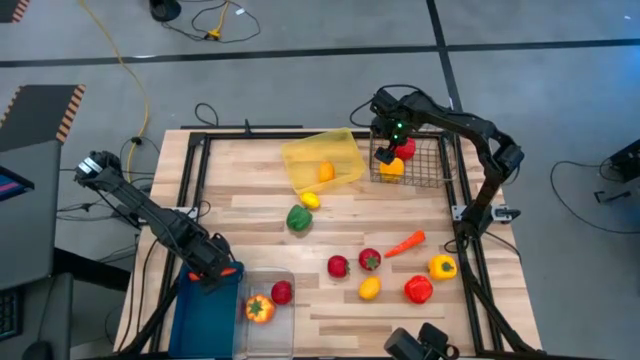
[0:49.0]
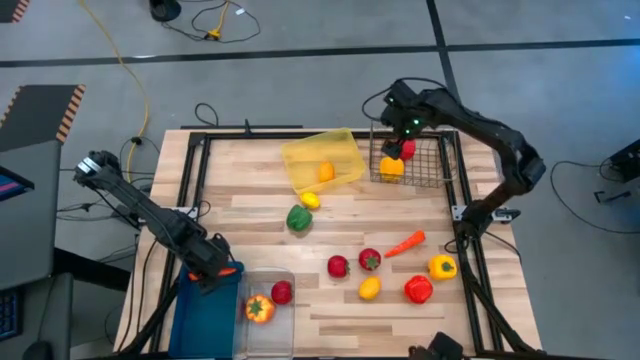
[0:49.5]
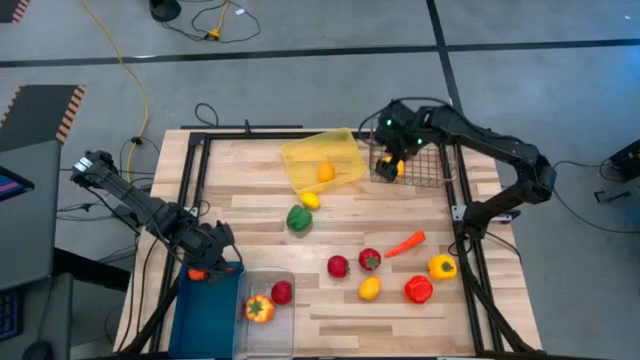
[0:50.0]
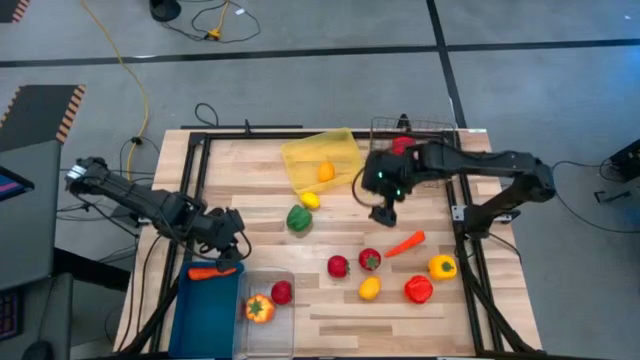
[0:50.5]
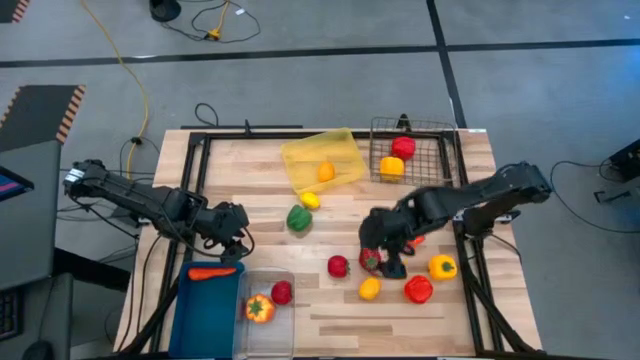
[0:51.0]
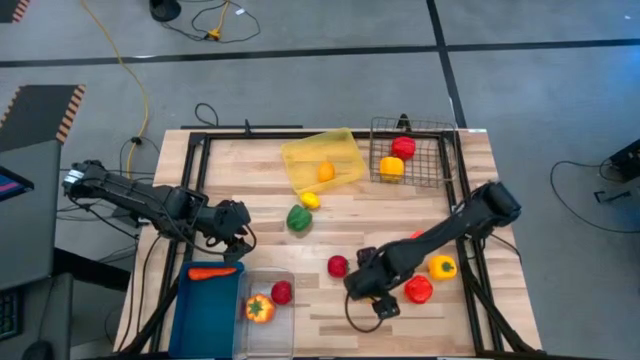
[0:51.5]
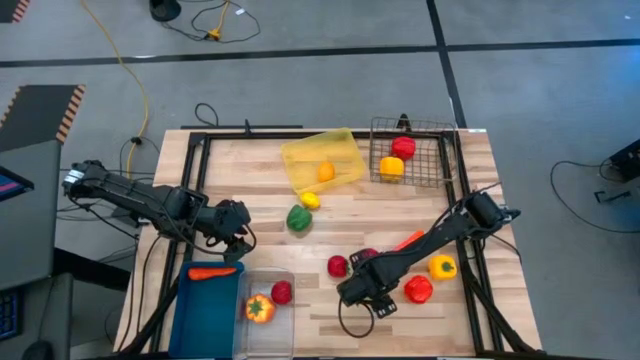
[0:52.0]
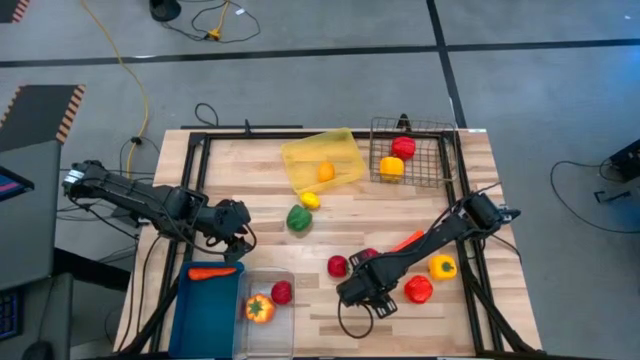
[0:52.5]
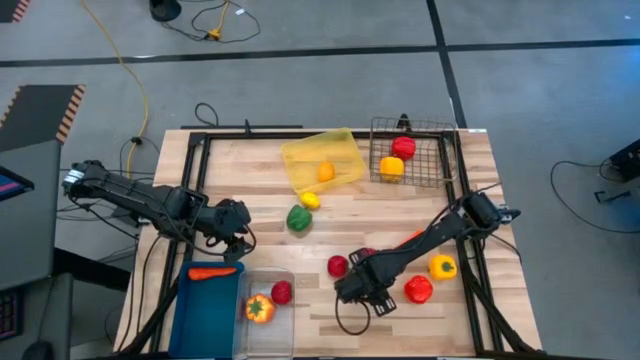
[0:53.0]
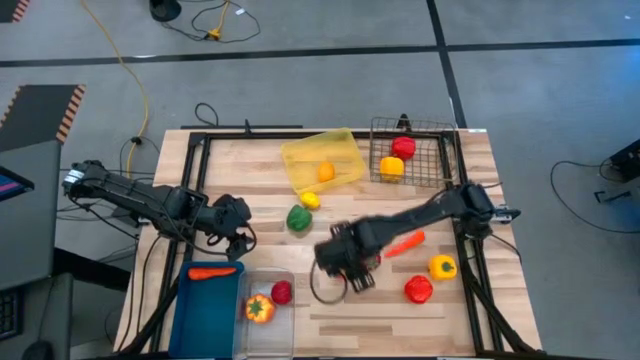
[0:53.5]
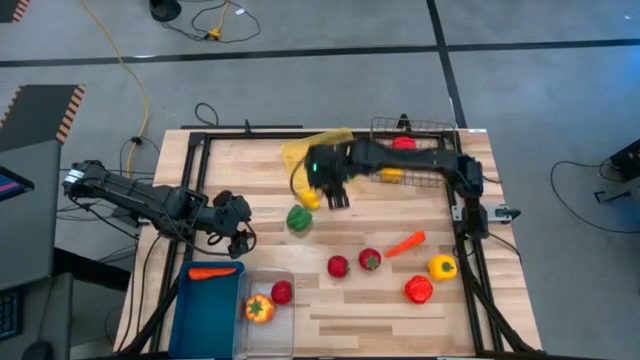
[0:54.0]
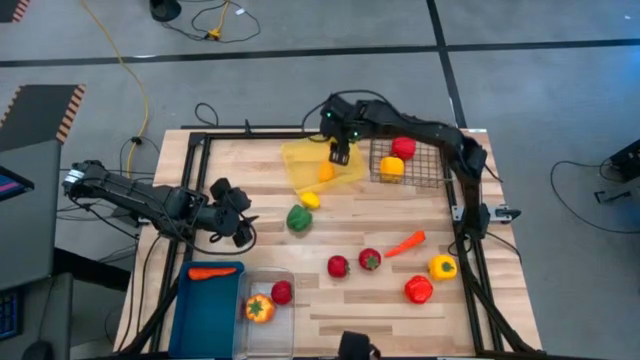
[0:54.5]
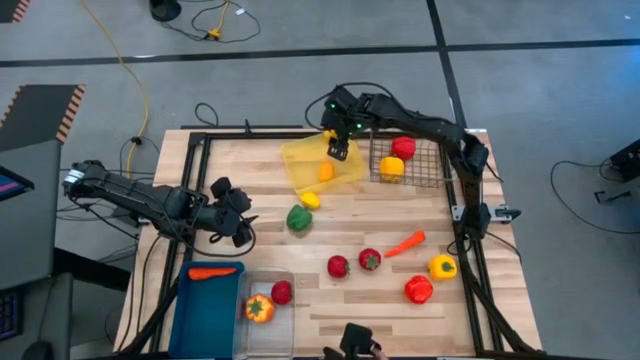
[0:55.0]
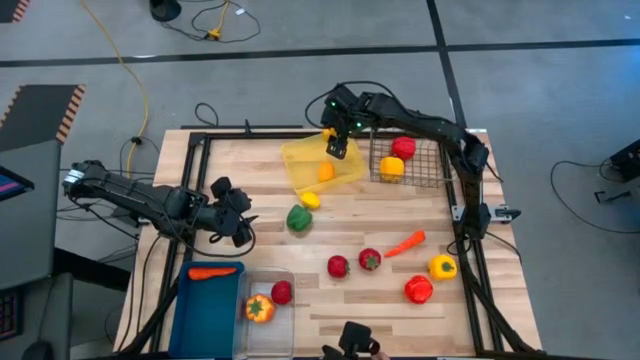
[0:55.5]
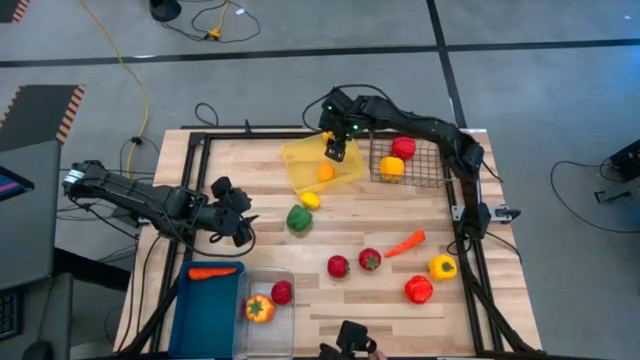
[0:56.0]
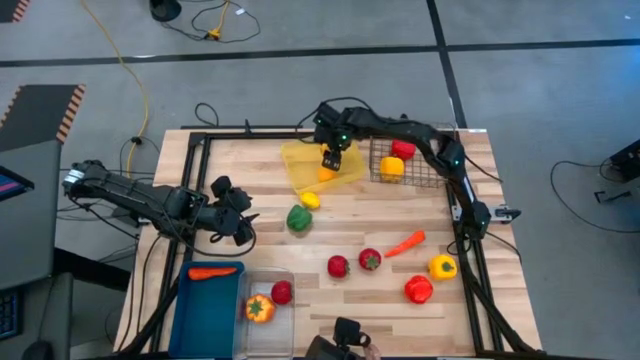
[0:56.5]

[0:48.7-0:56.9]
Task: Sort produce into baskets
Put the bottom yellow lemon into the yellow bin

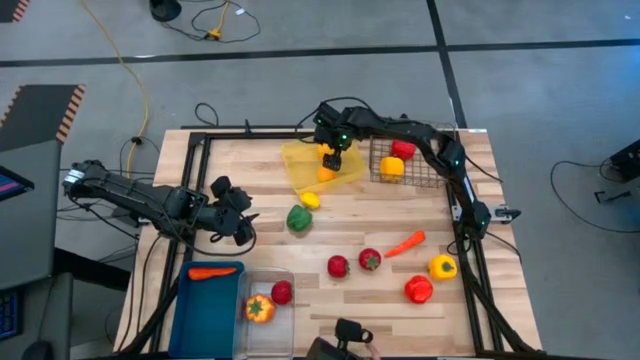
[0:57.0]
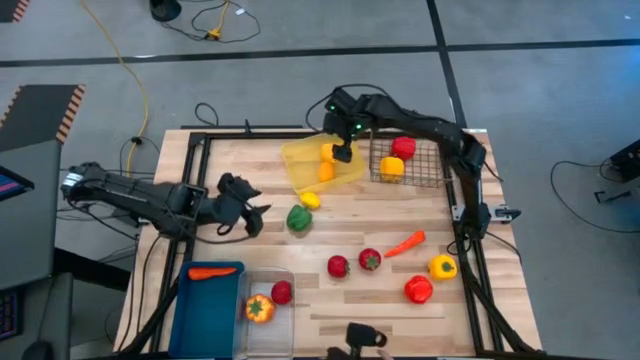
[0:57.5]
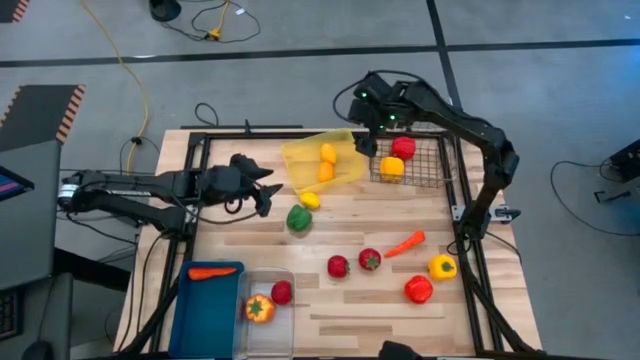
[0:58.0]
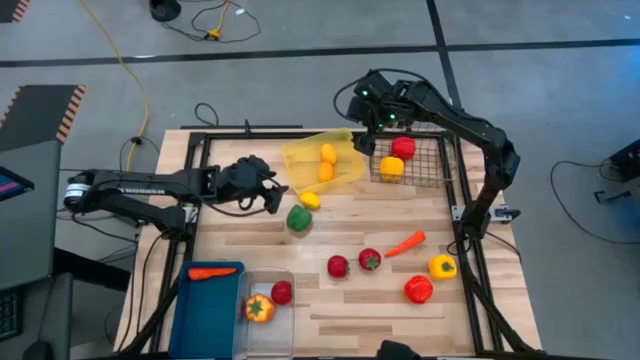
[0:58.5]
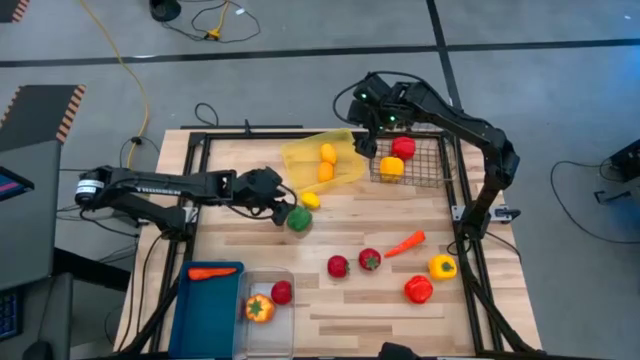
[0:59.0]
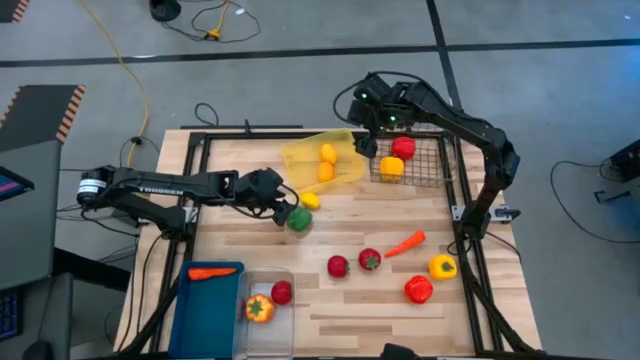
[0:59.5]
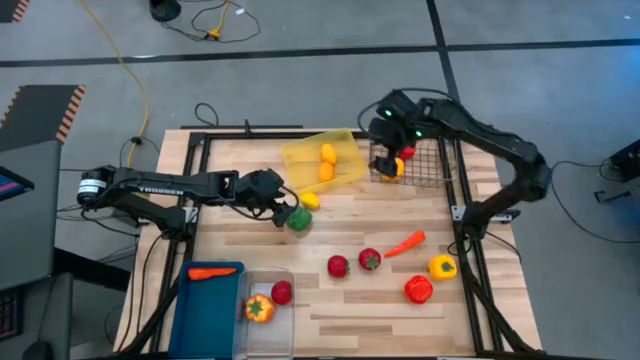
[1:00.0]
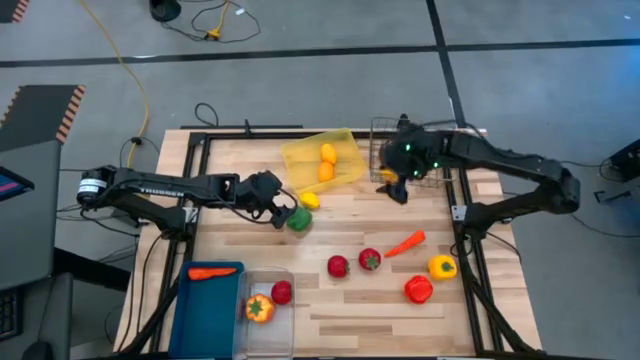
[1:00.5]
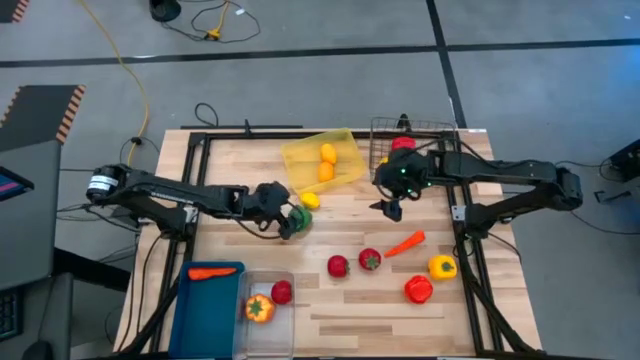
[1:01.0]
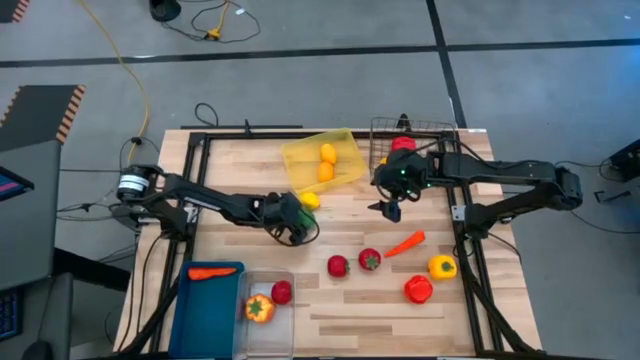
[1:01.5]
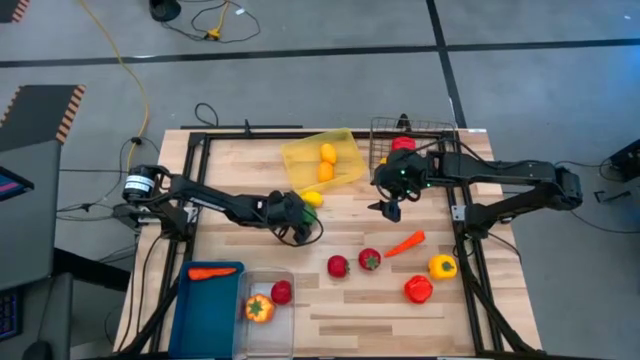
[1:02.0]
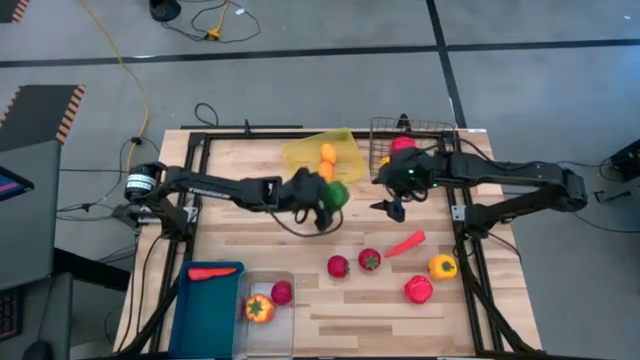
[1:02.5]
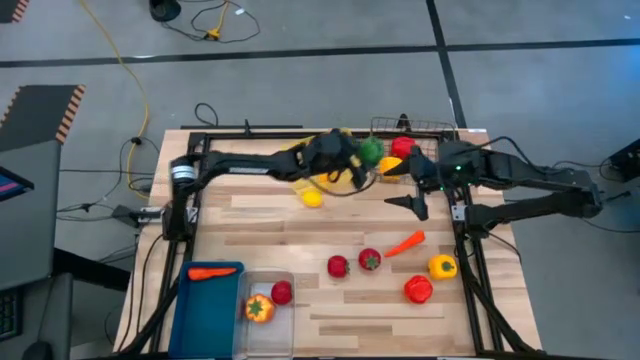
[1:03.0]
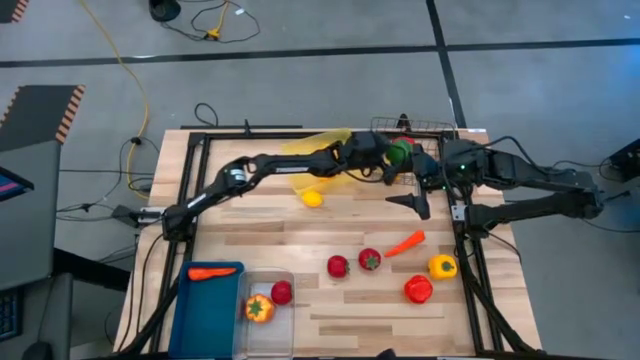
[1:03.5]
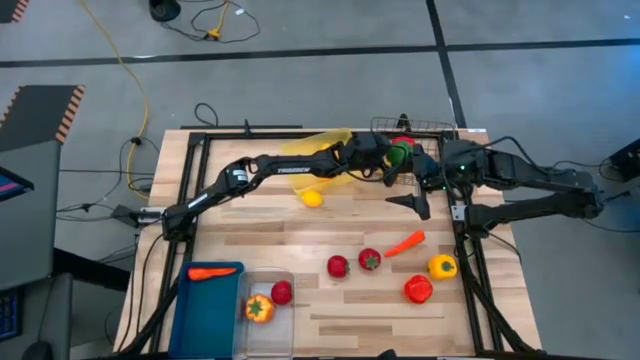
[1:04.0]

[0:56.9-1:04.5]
Put the green bell pepper into the wire basket

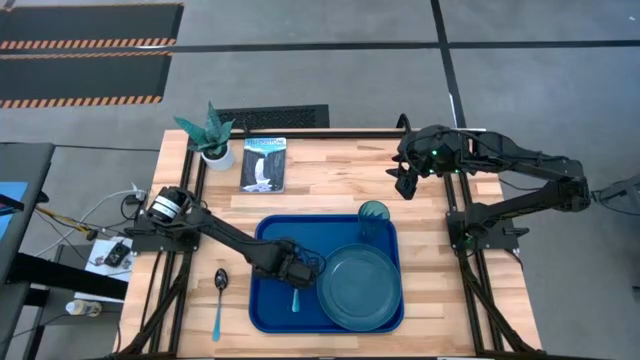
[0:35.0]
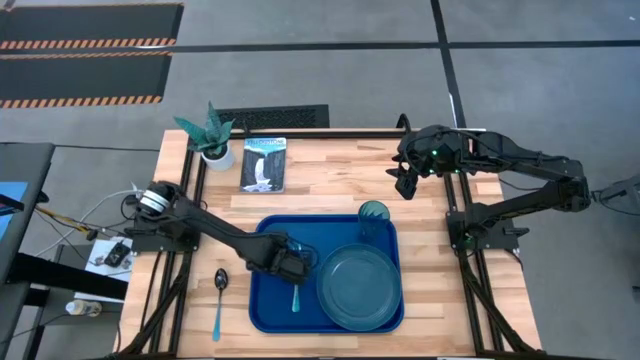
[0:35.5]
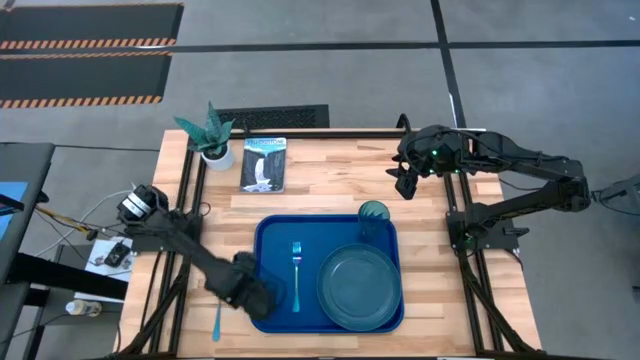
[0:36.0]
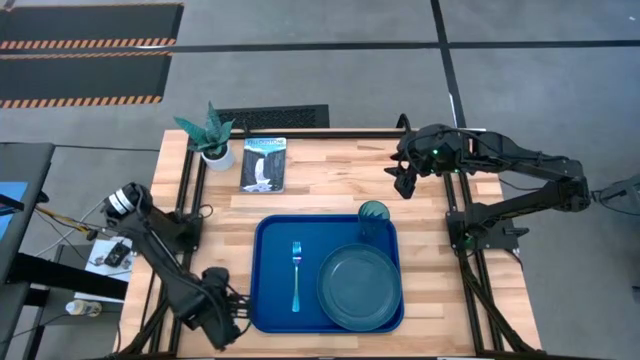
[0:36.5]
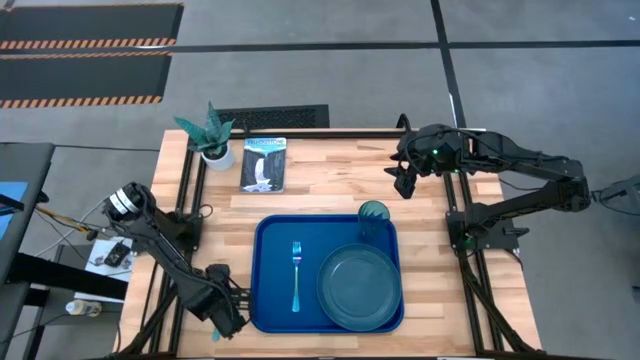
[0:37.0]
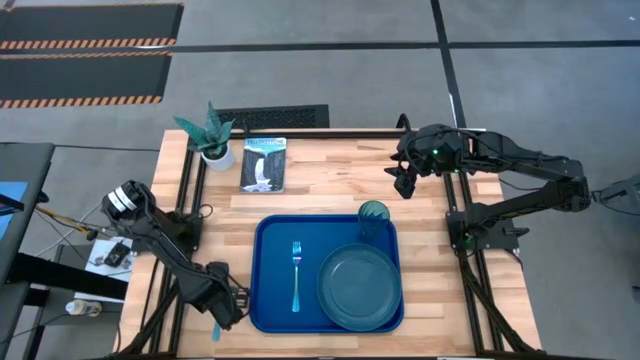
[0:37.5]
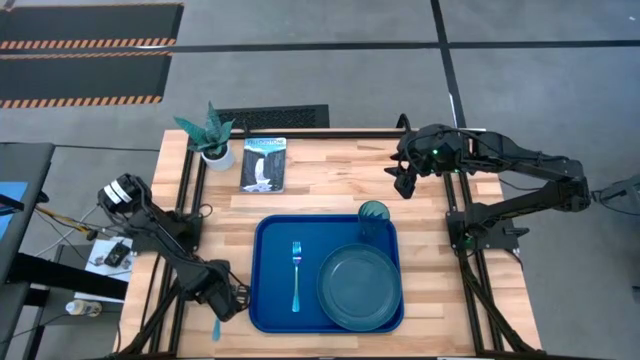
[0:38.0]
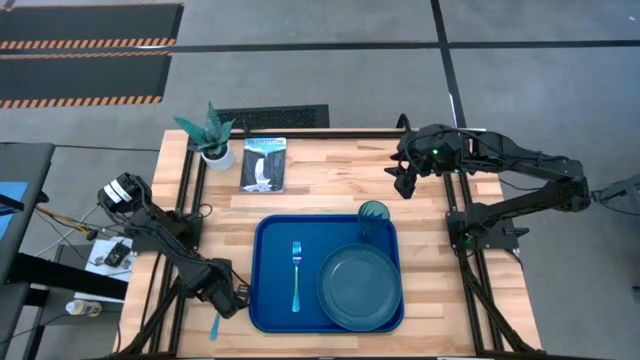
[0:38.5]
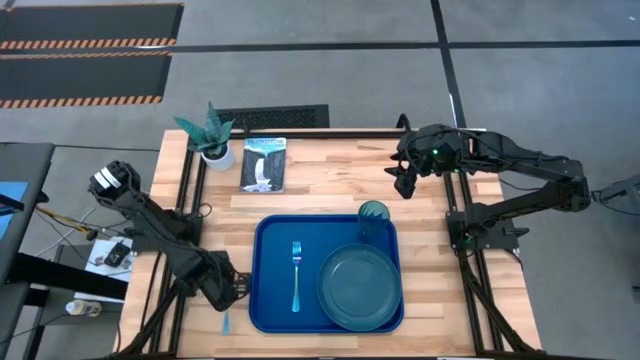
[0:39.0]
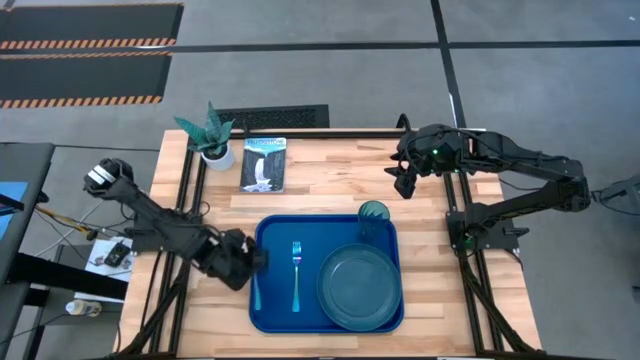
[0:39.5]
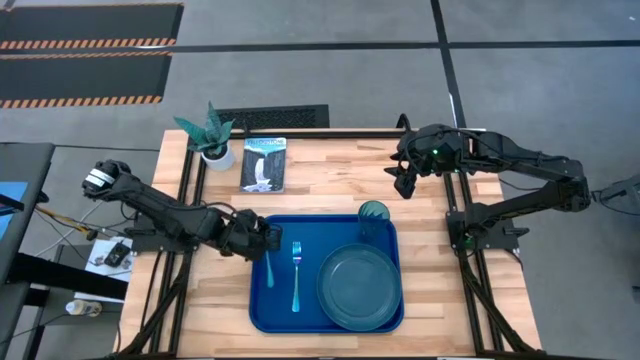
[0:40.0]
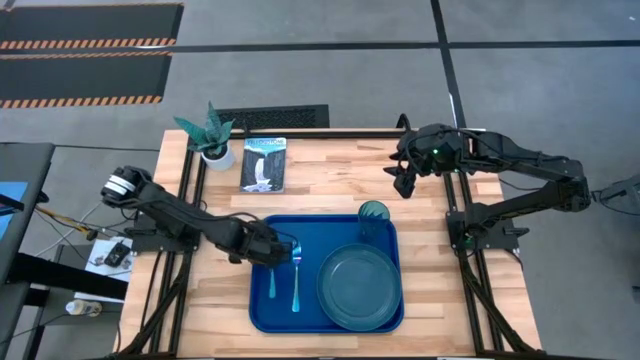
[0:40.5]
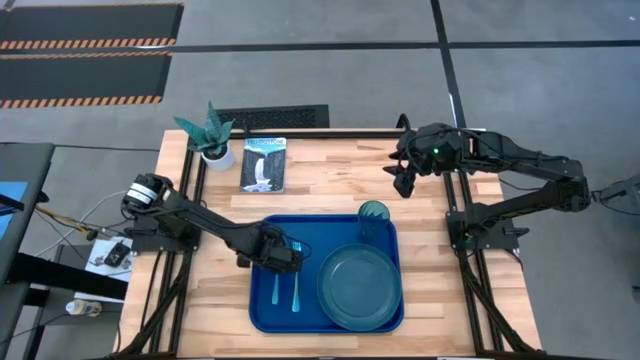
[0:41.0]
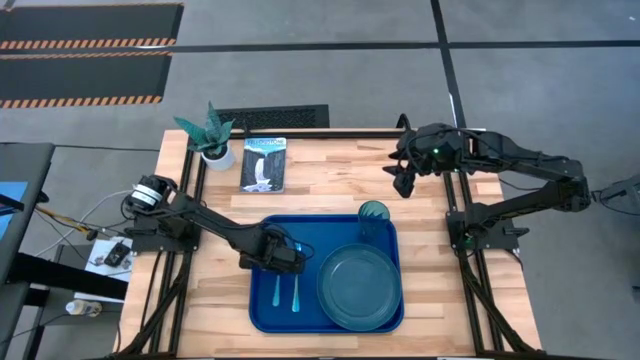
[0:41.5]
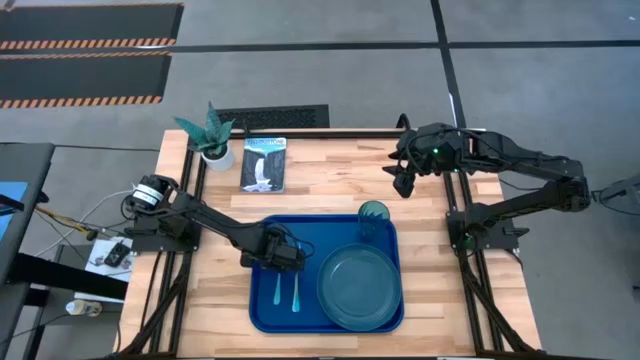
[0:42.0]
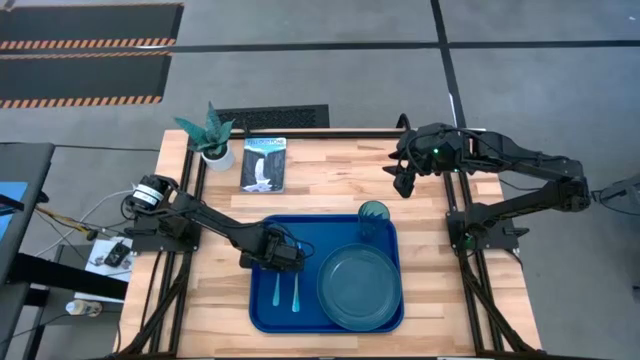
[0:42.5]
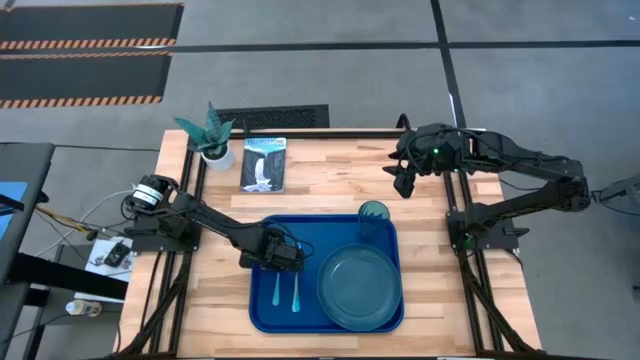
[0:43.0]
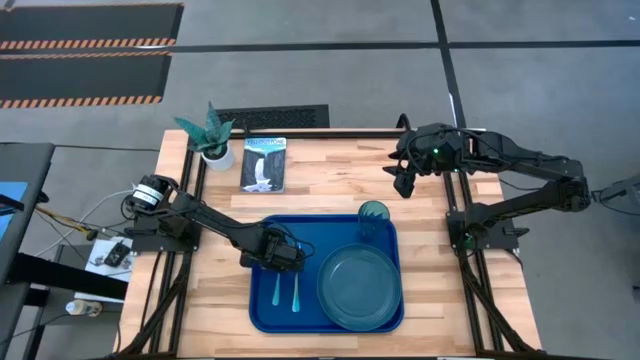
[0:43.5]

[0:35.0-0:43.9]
Task: Pick and place plate/cup/fork/spoon on tray
Put the blue spoon on the blue tray to the left side of the blue fork
